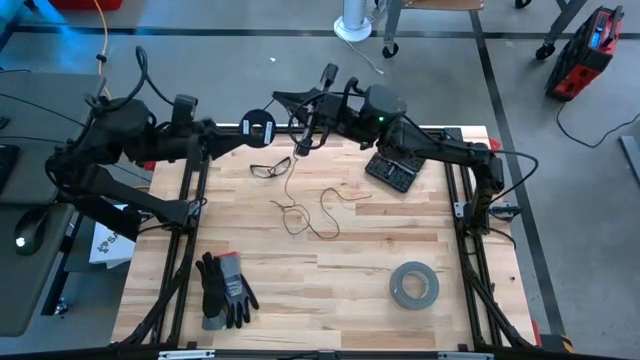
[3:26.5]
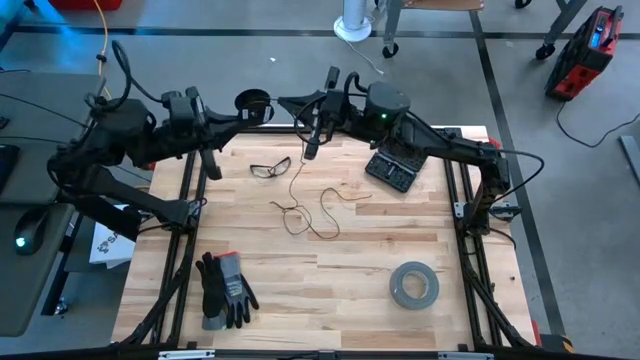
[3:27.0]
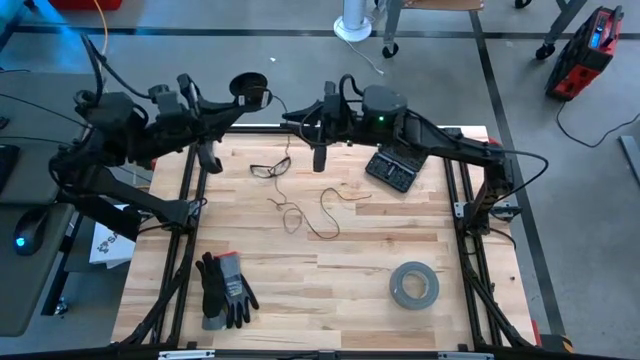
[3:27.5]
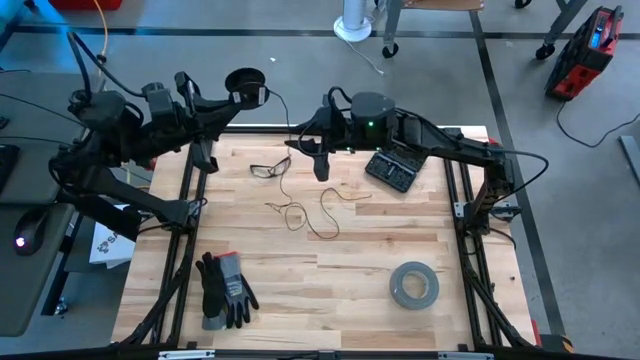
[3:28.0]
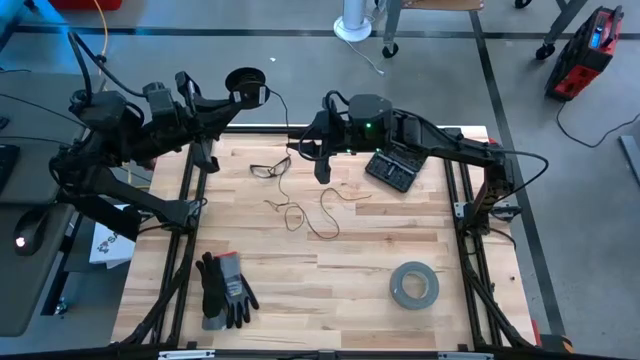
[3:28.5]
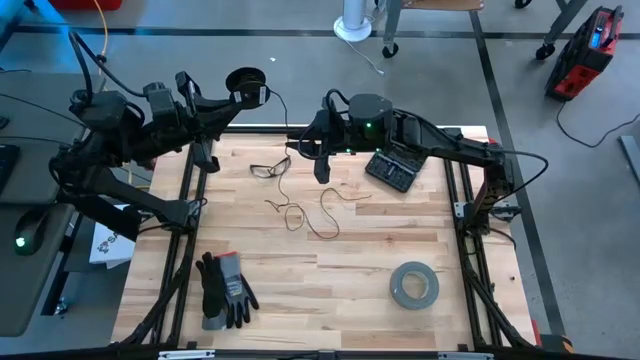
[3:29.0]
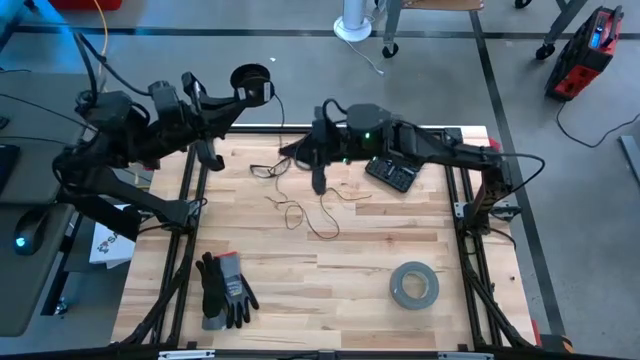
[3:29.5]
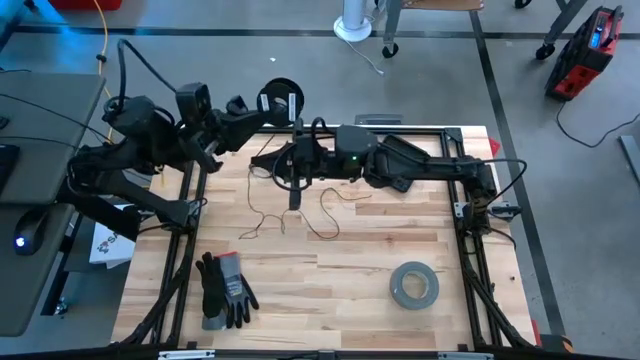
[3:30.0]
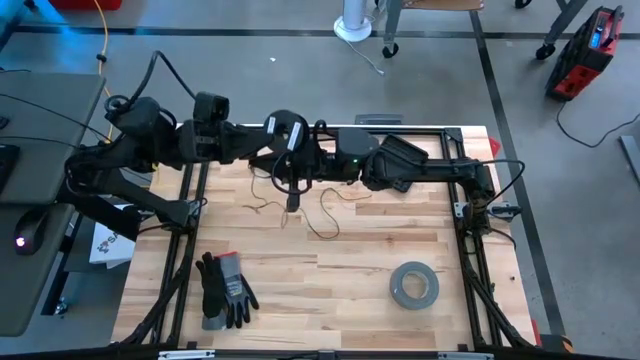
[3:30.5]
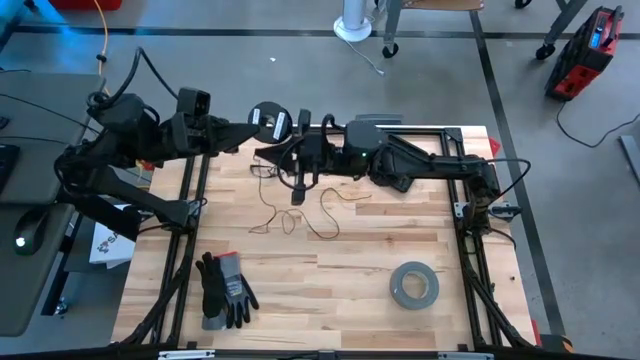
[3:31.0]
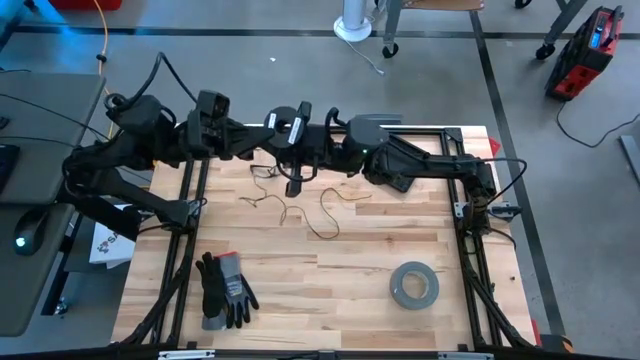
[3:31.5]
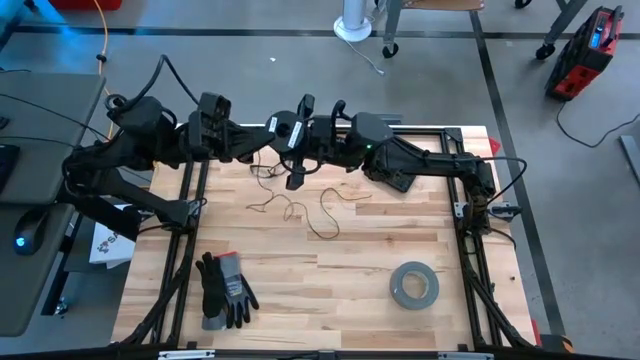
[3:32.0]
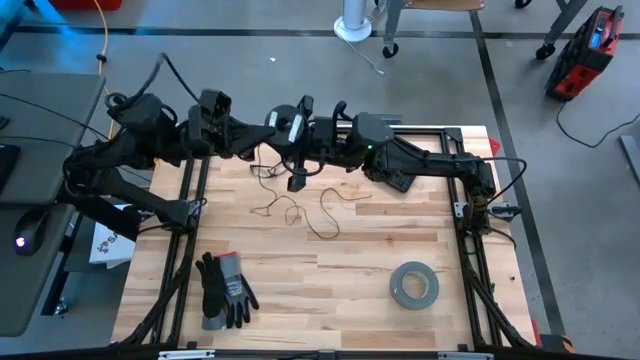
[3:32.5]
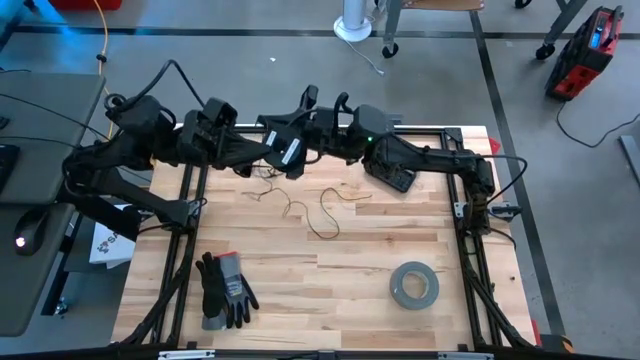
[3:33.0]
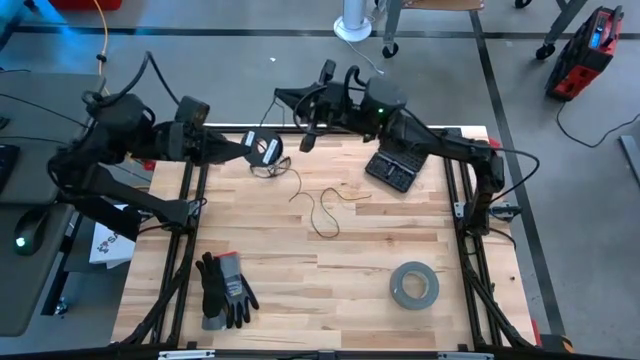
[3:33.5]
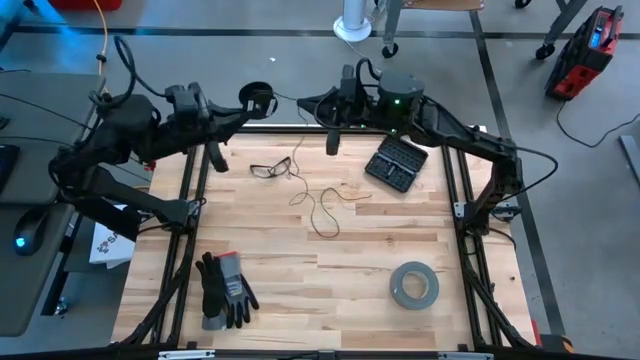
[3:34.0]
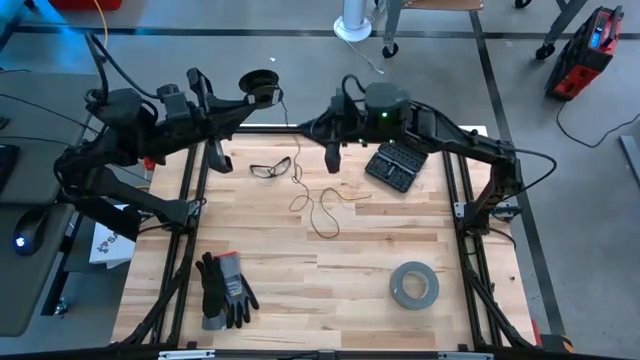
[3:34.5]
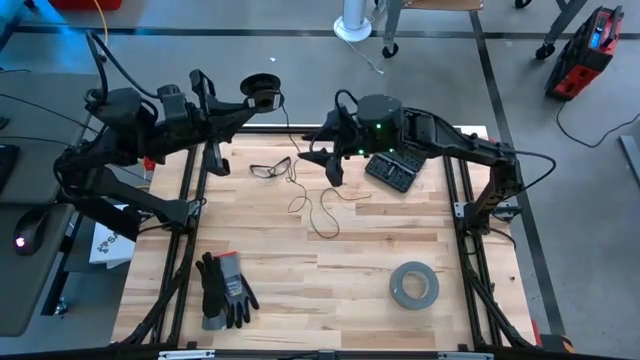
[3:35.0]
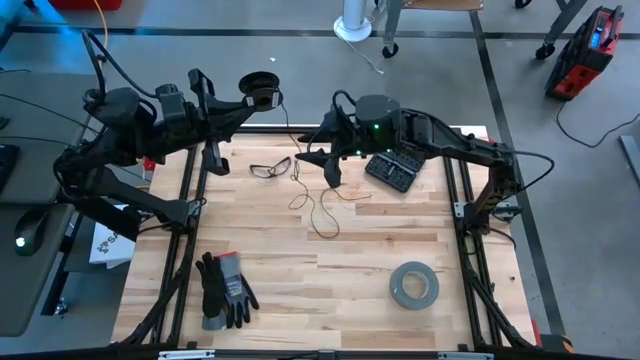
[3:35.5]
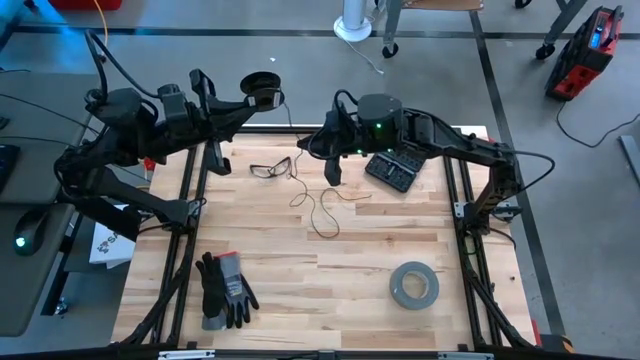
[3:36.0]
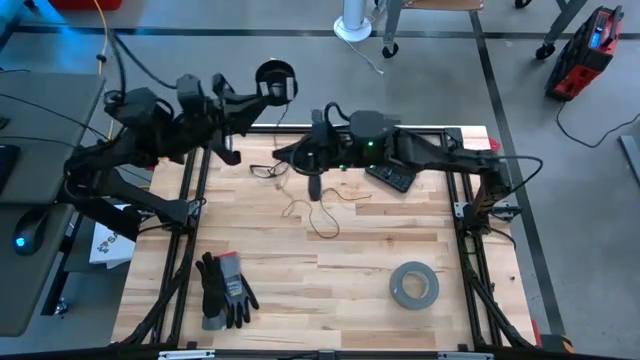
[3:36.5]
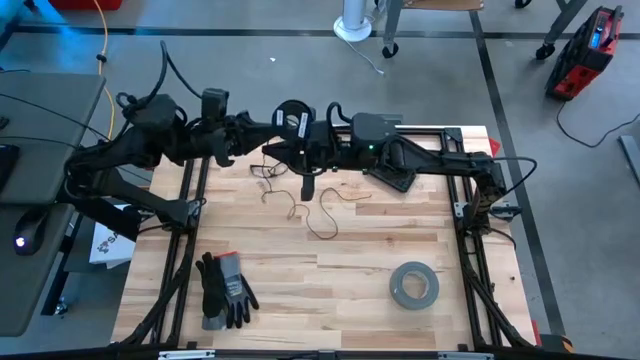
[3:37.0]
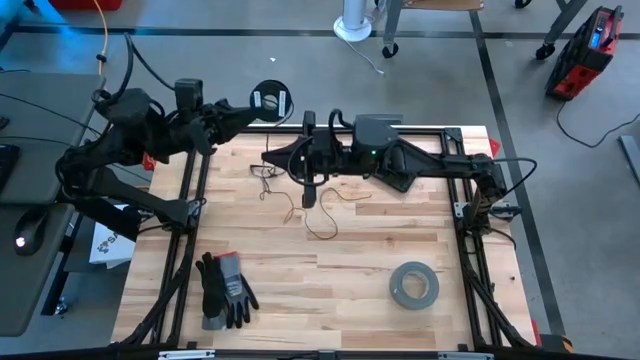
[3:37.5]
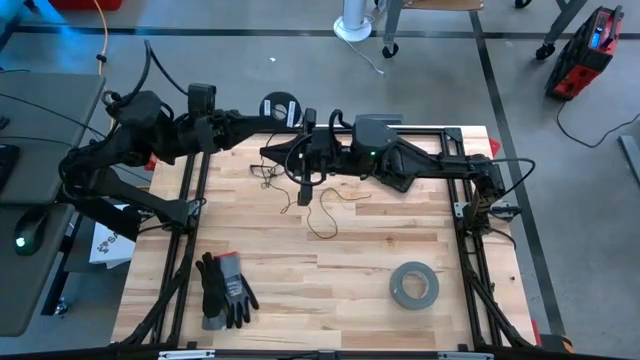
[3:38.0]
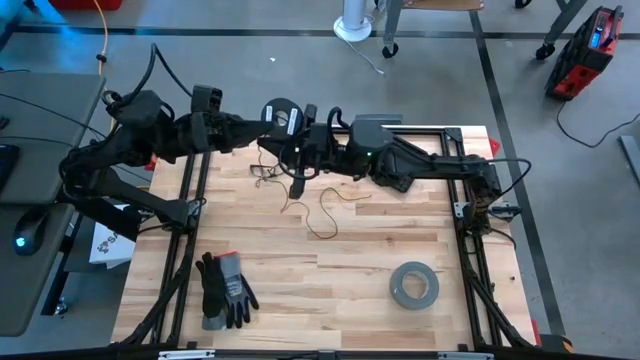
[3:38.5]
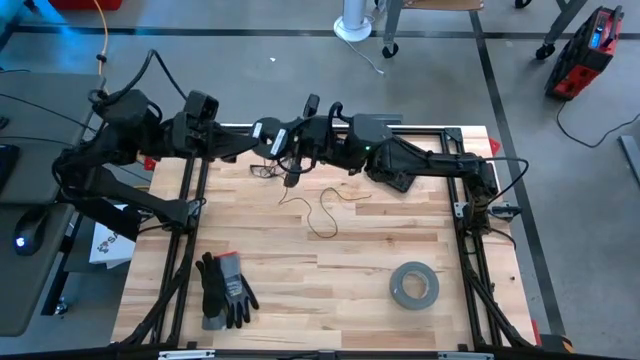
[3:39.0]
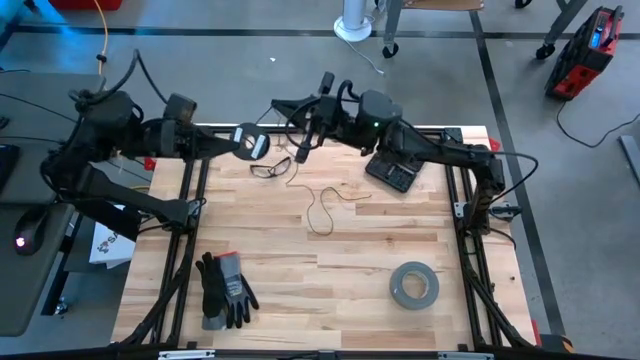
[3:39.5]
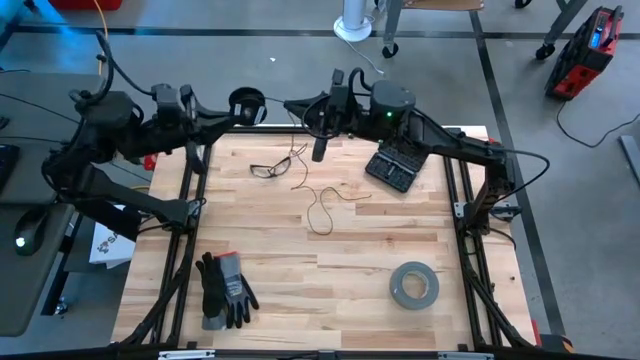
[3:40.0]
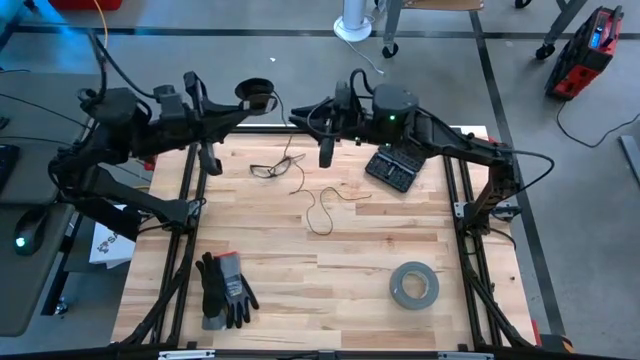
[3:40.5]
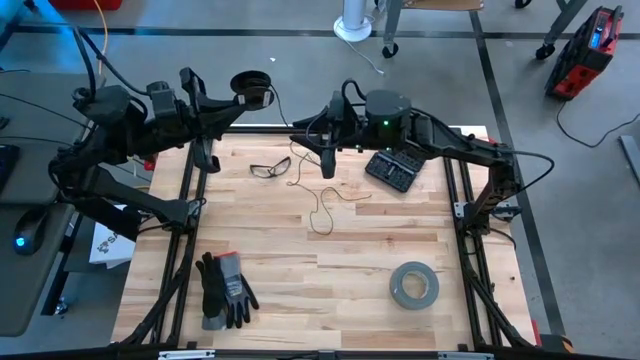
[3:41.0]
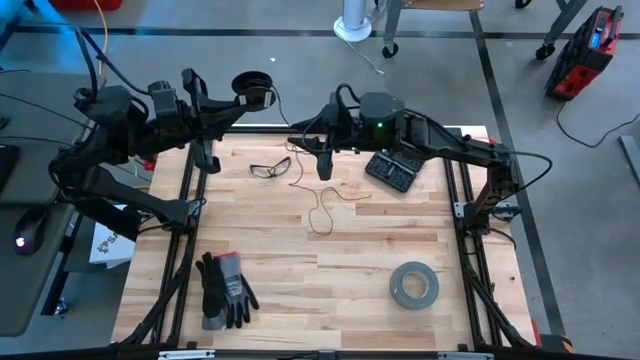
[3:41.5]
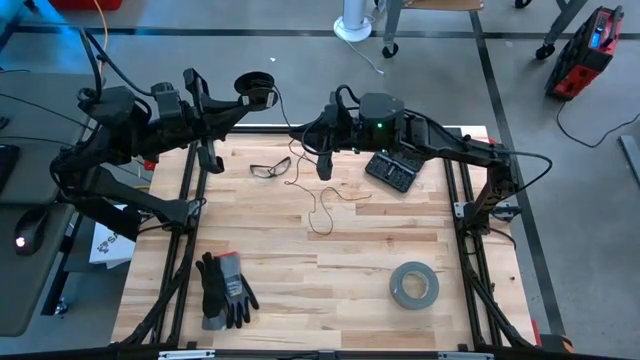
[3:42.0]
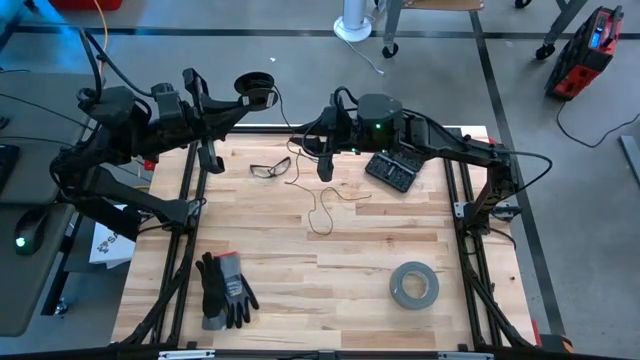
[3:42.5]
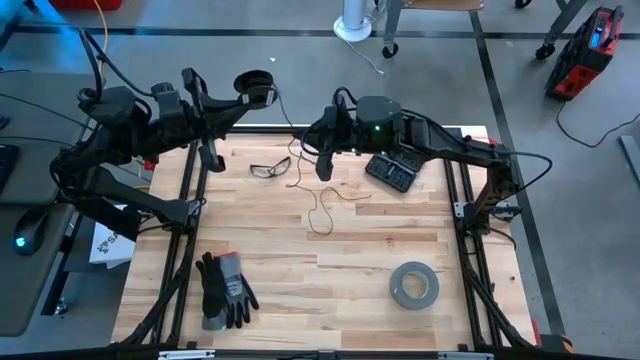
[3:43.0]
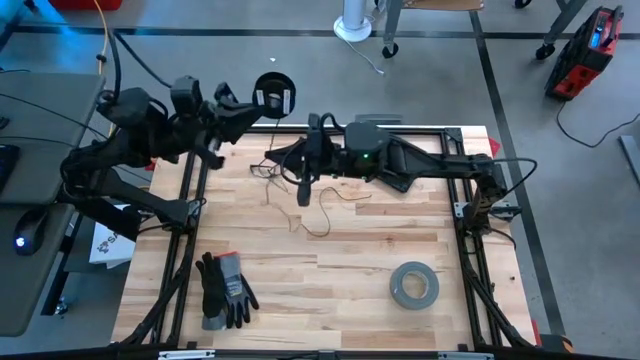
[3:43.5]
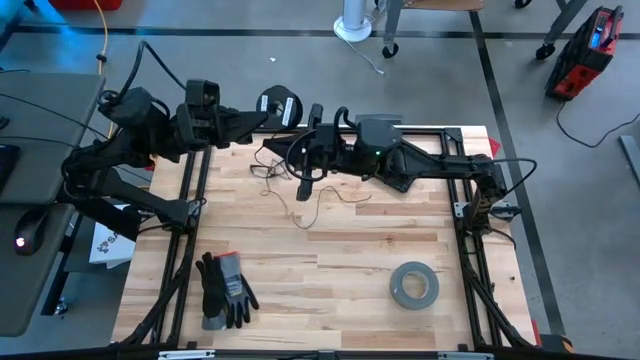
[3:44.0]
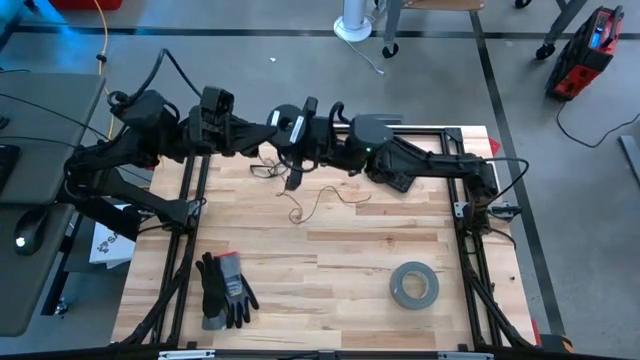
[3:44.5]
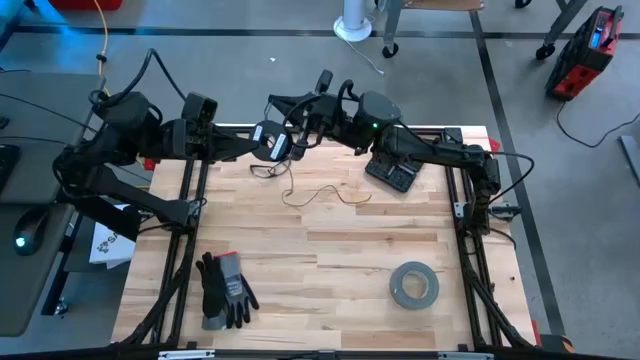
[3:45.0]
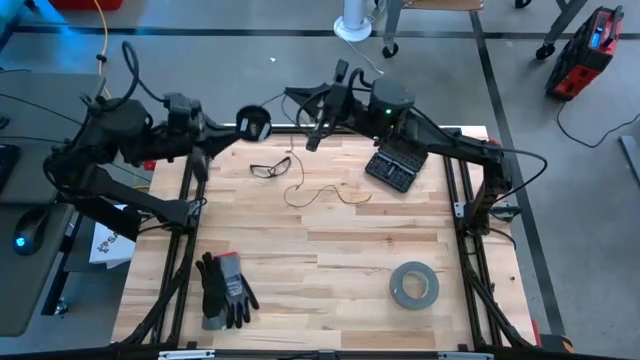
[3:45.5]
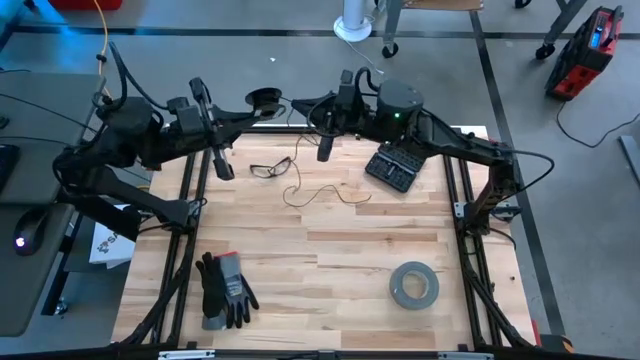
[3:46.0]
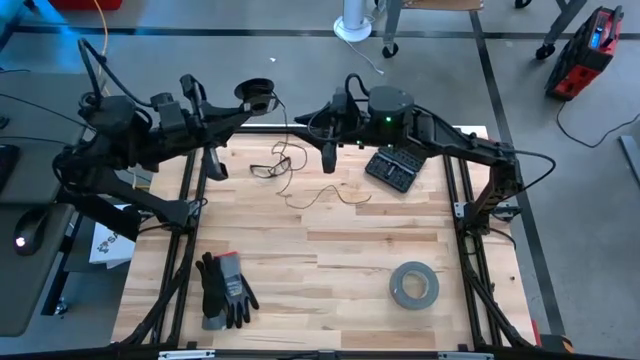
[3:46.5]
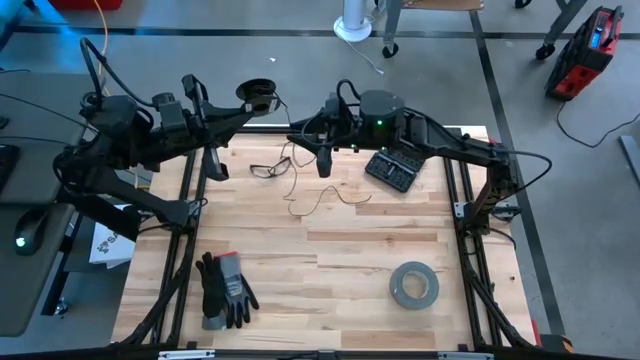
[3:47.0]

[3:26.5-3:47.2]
Task: Coil cords
Coil the black wire on the black spool
